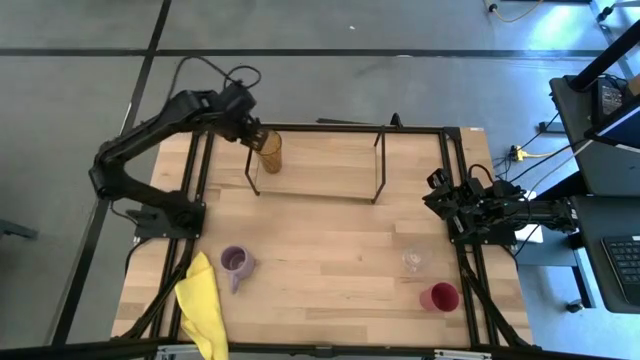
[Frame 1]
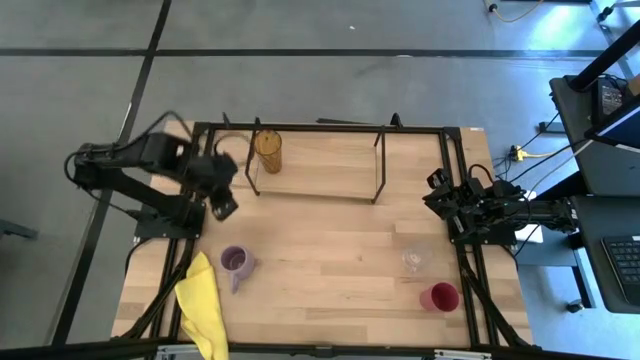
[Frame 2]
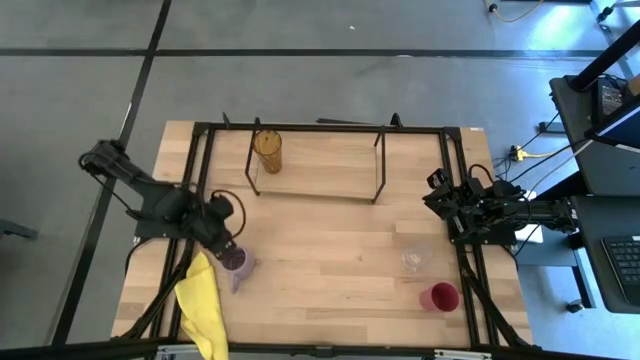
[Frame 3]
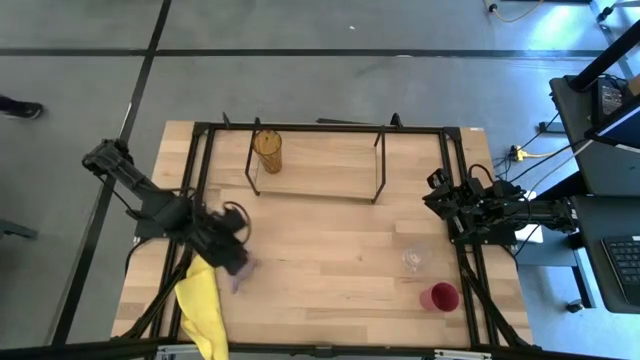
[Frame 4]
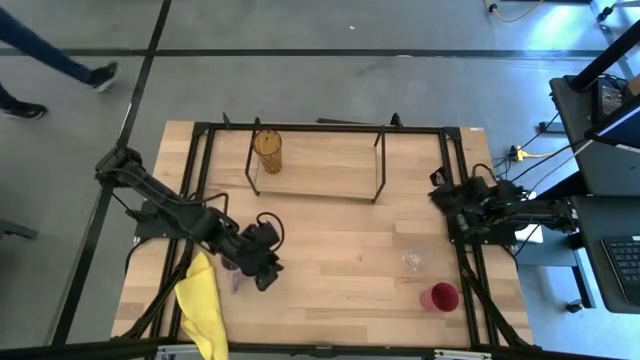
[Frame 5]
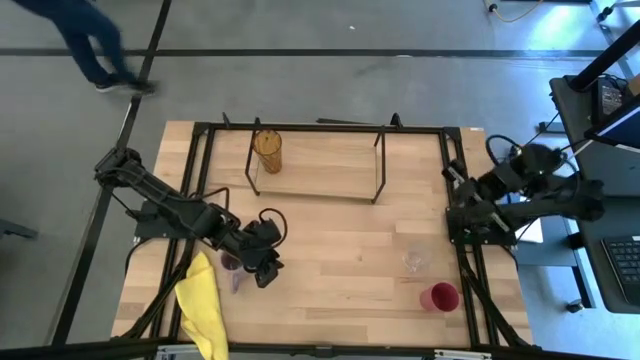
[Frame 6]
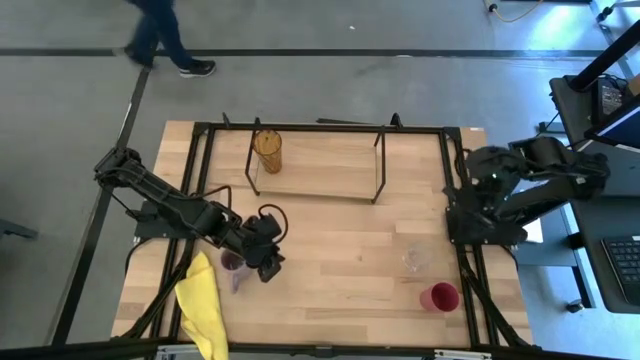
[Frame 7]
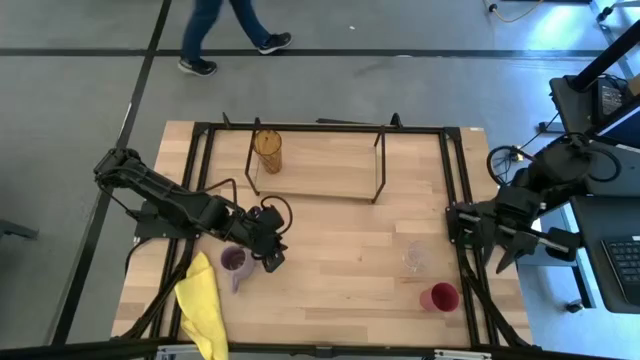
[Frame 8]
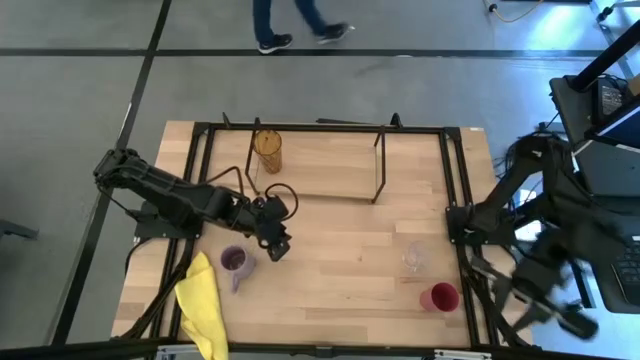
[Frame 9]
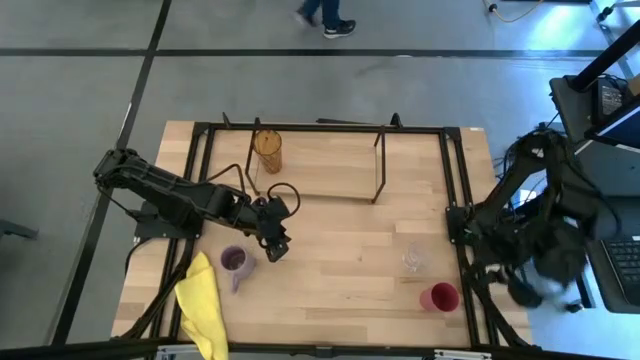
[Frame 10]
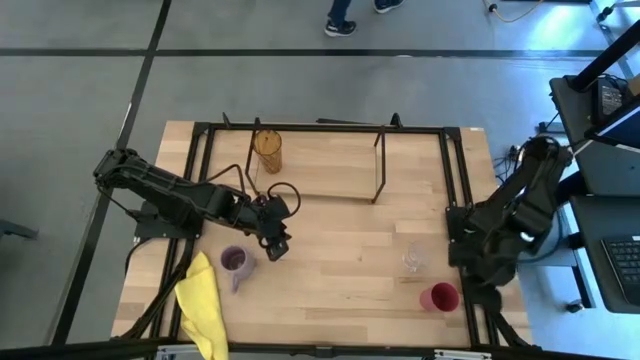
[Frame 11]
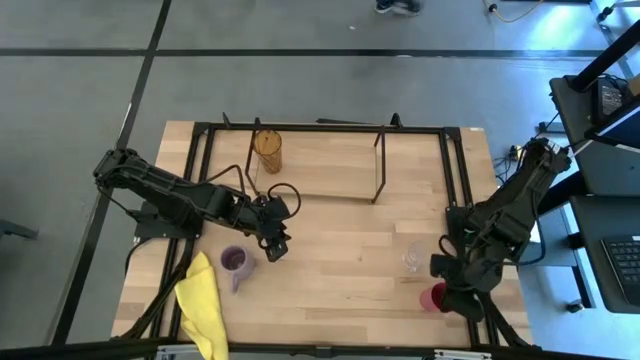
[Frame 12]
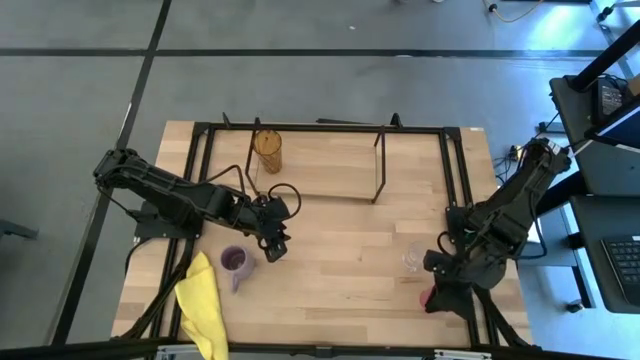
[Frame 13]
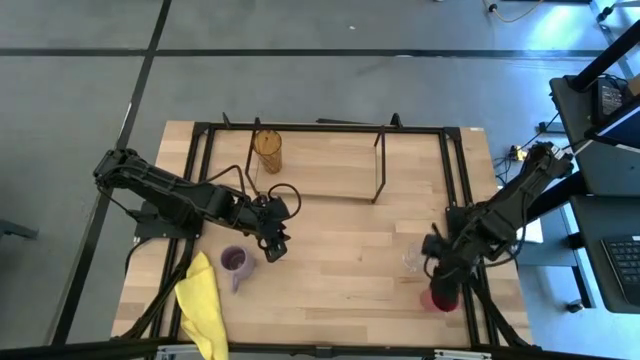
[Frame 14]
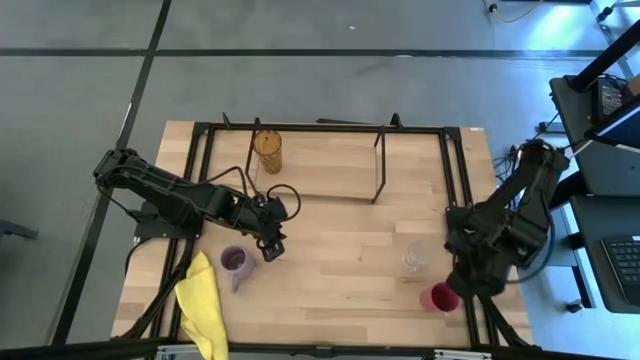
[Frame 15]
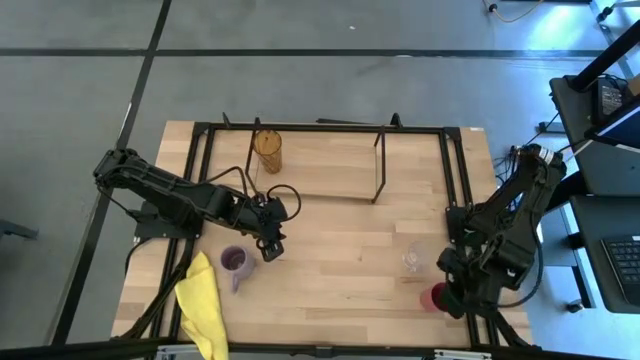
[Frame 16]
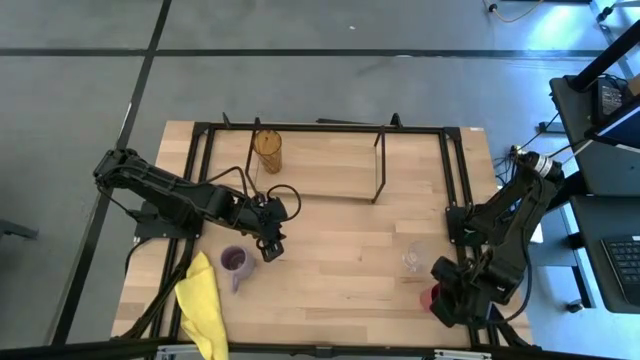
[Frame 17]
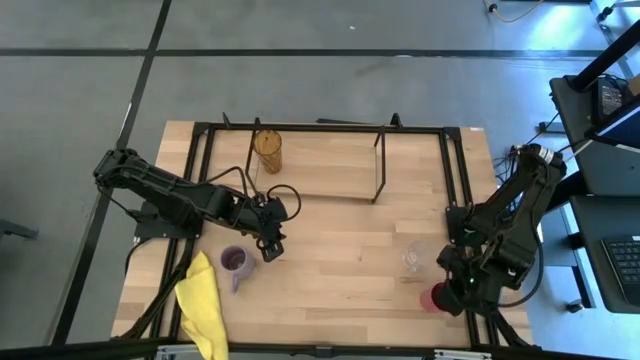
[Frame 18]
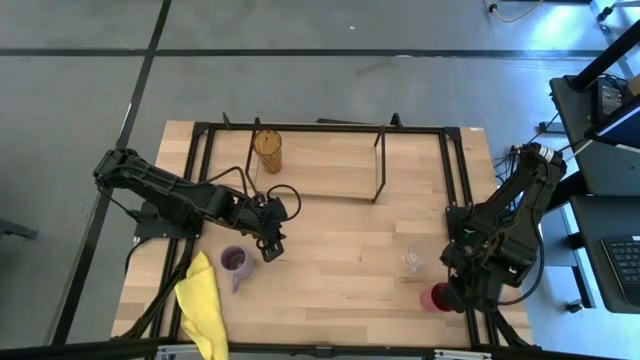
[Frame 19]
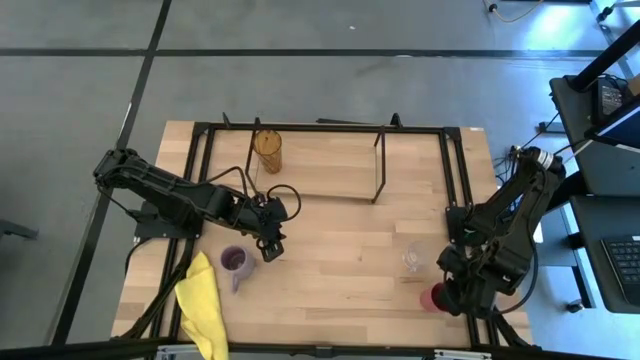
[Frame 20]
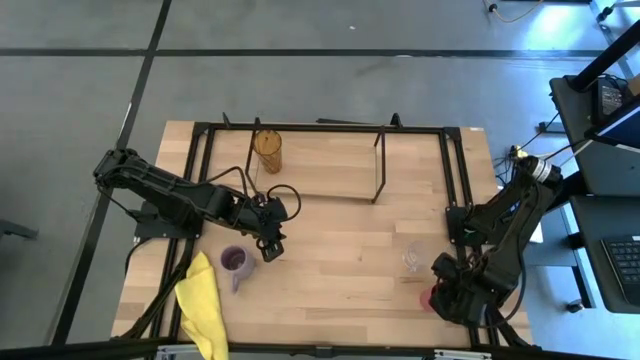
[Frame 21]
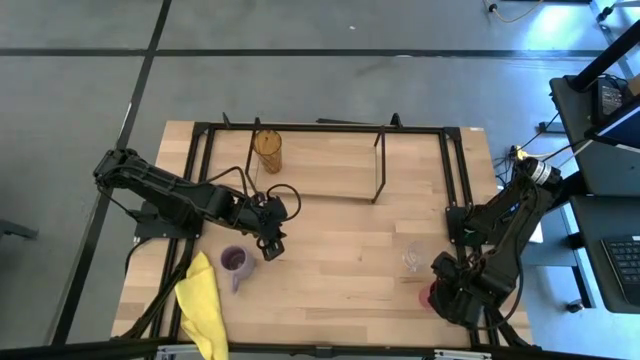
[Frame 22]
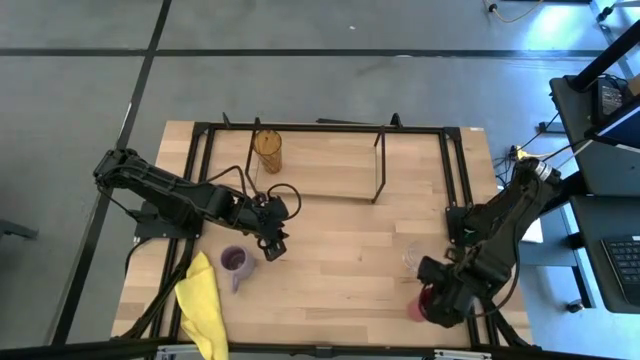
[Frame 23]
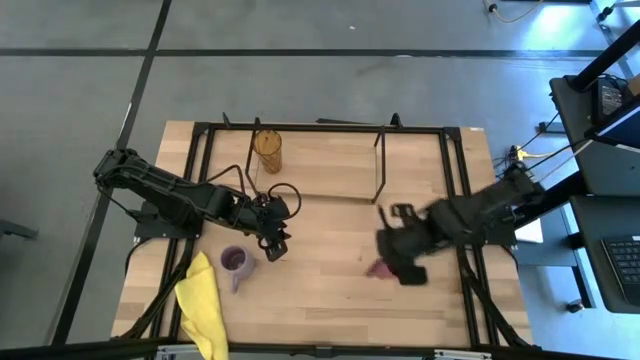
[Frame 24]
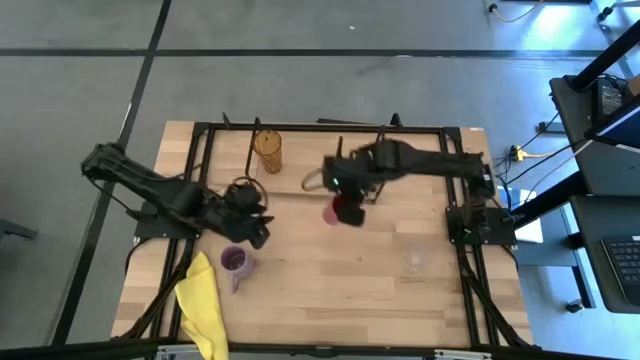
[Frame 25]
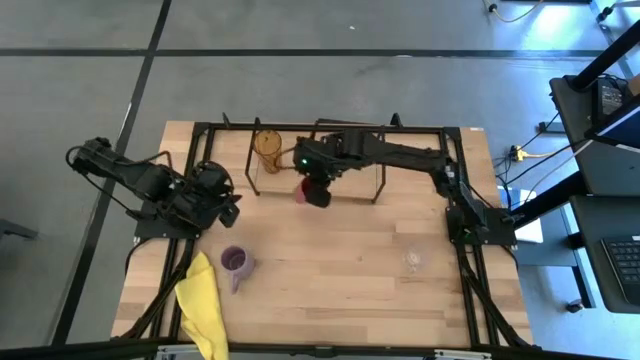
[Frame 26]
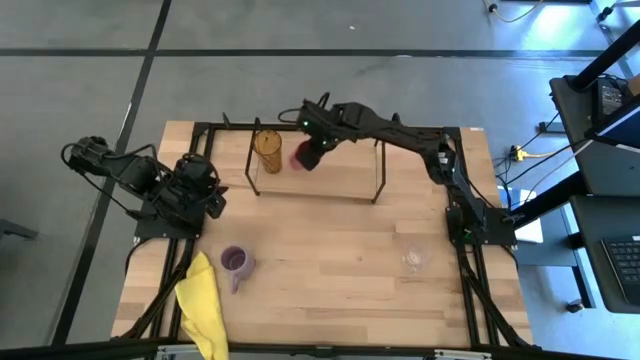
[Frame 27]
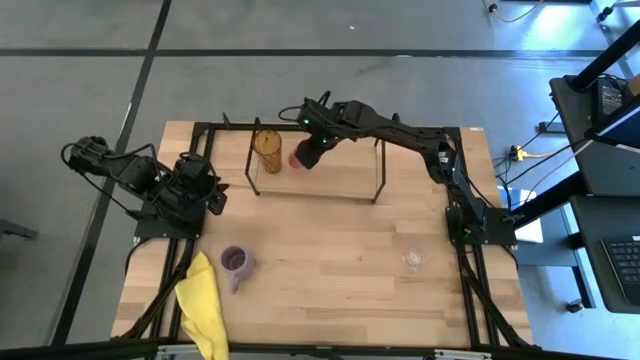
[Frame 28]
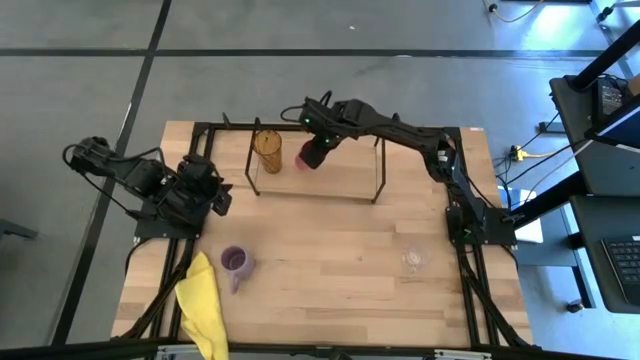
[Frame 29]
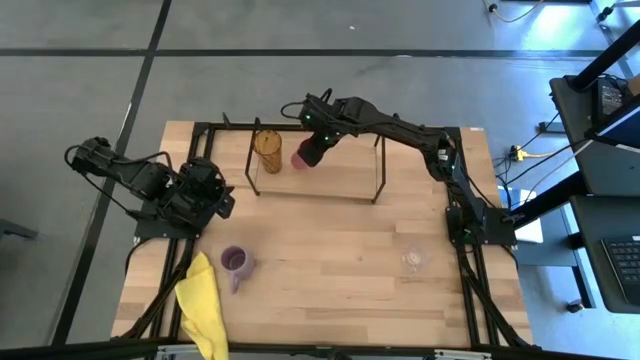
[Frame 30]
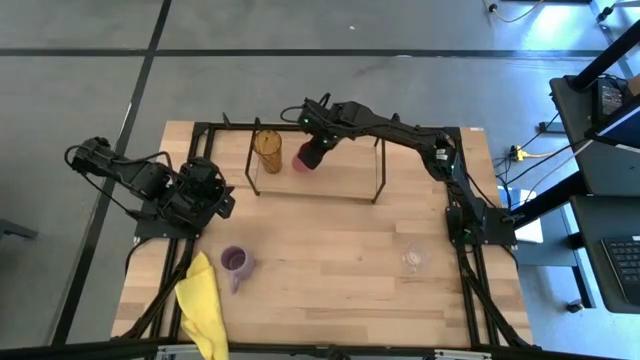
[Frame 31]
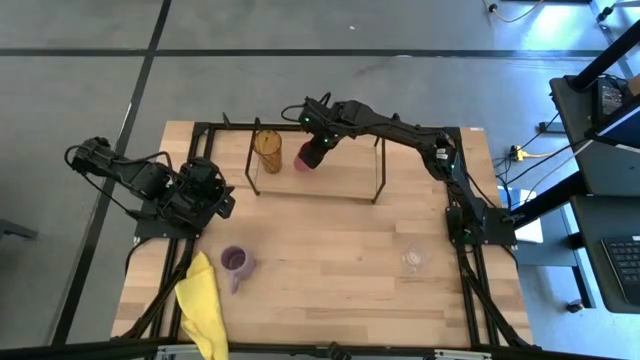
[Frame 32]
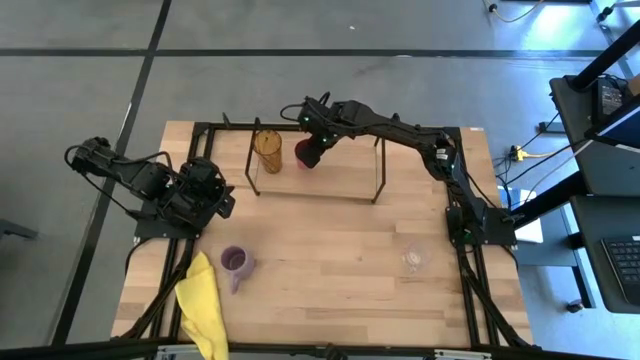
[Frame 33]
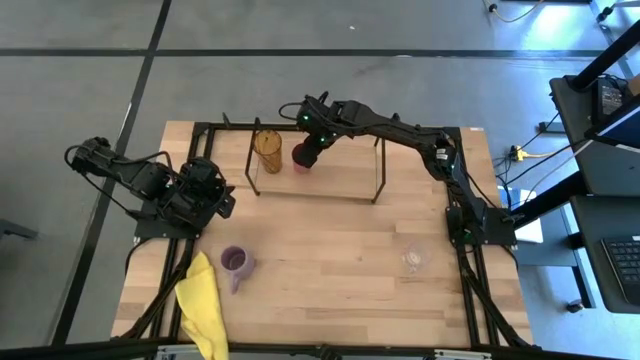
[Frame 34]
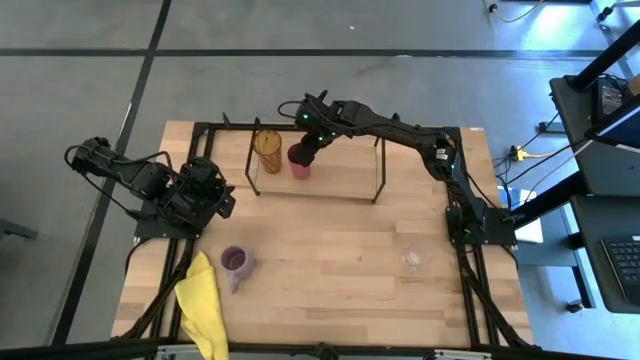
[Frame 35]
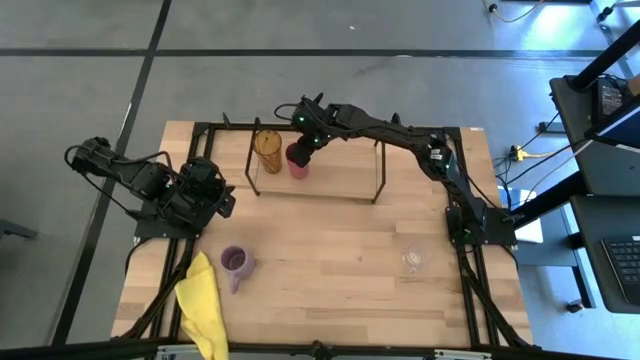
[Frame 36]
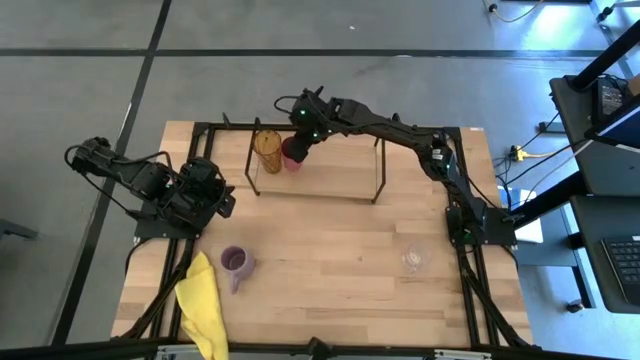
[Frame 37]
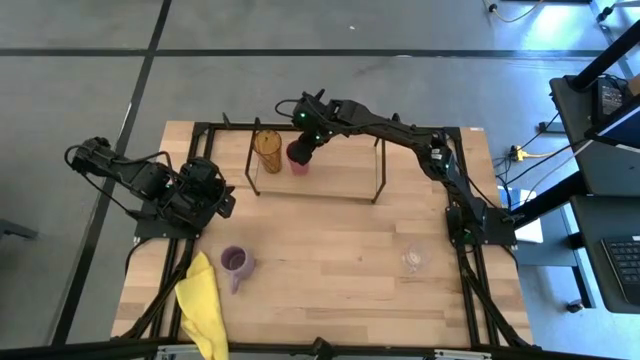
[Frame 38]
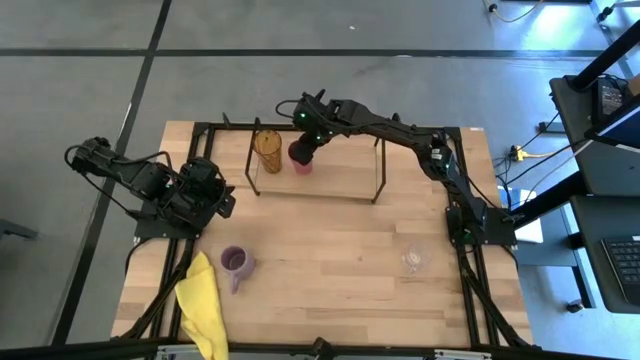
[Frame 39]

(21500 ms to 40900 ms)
Task: Stack small to large cups/mugs on shelf
Put the red cup on the shelf

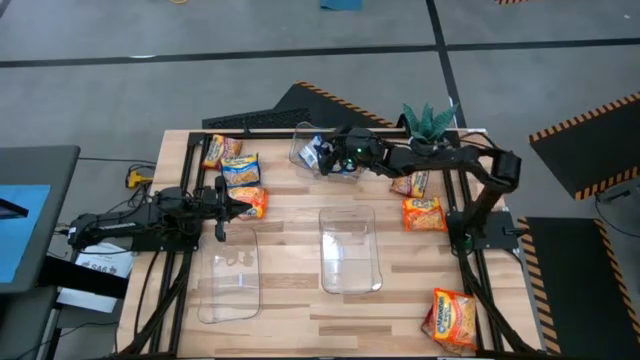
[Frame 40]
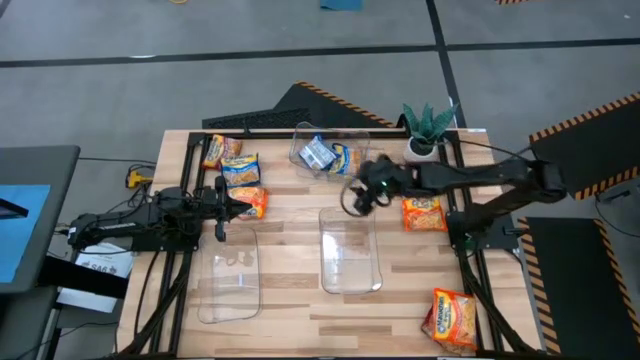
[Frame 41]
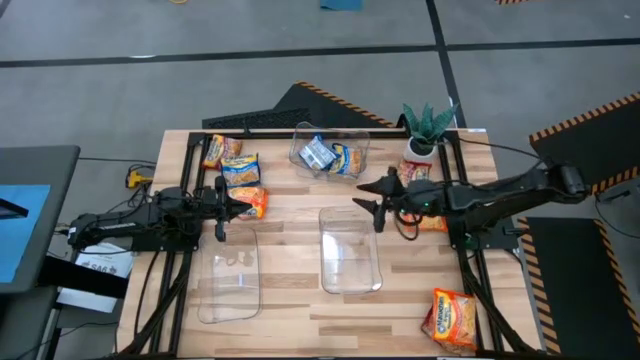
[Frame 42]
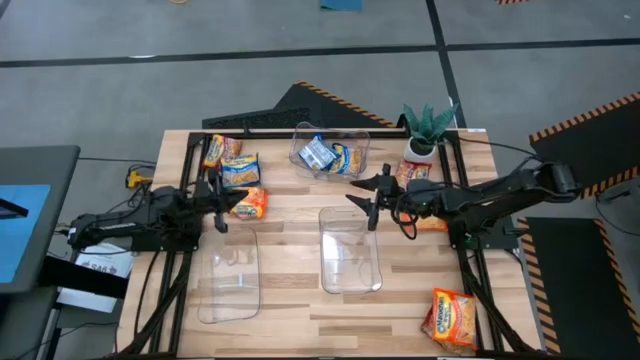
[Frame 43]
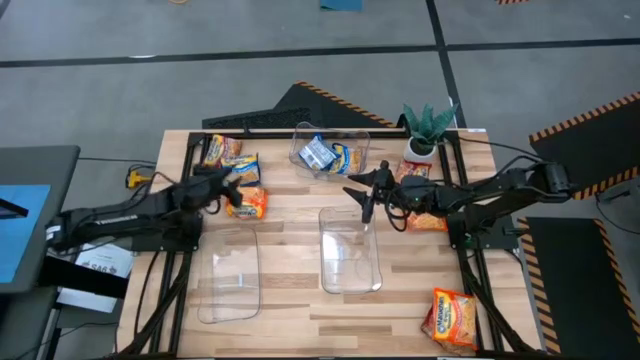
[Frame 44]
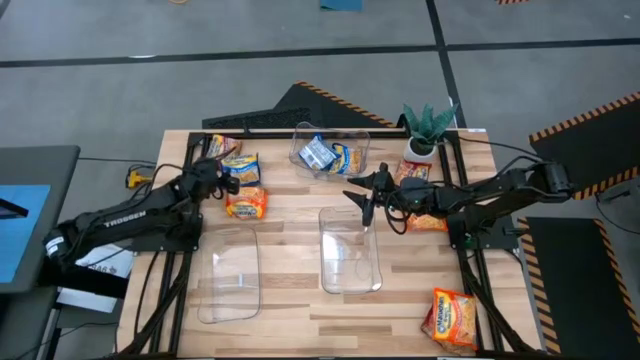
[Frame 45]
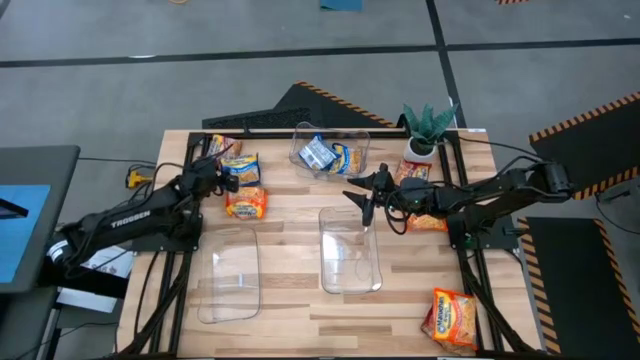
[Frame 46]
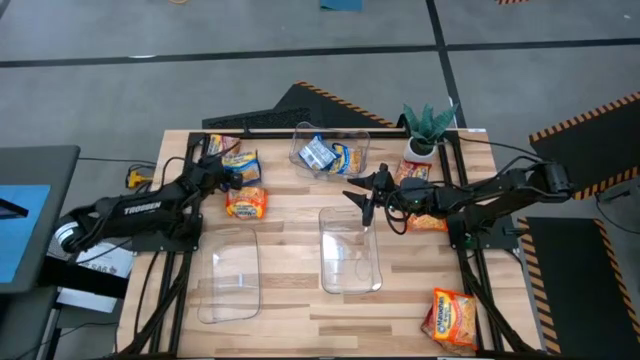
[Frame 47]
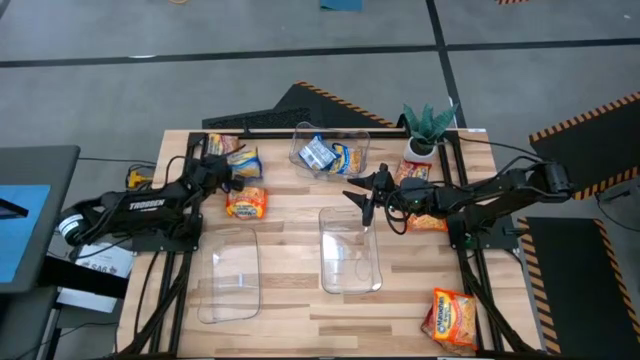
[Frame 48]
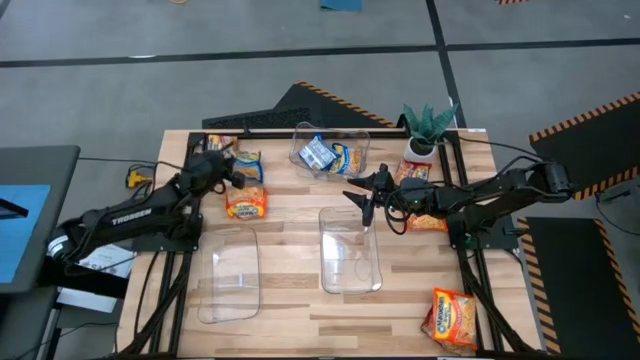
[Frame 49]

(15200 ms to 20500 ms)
Task: Sort Maruchan noodles
Put the blue noodle pack into the top transparent bin
